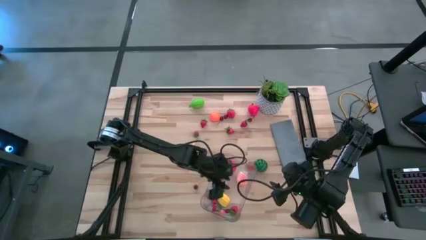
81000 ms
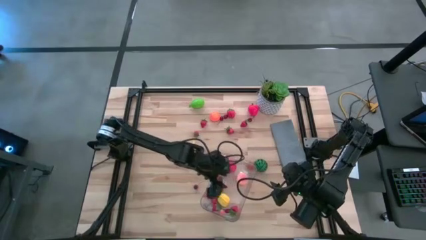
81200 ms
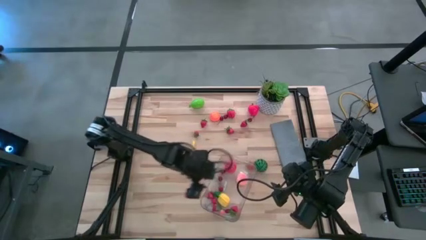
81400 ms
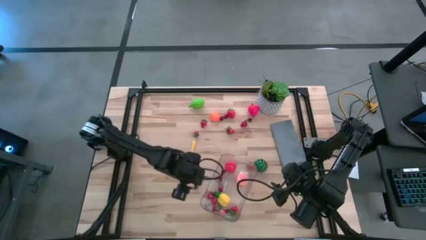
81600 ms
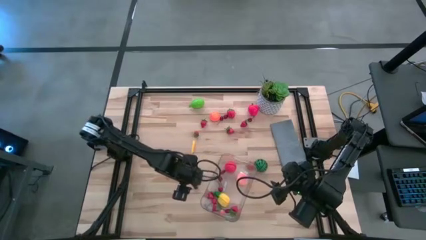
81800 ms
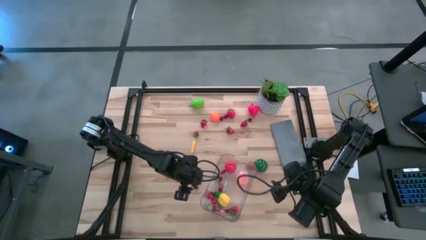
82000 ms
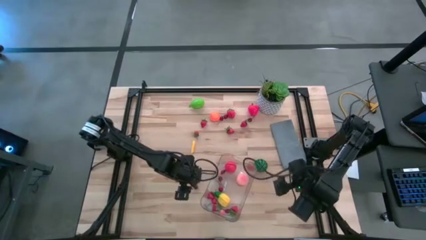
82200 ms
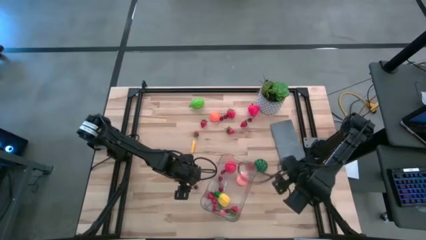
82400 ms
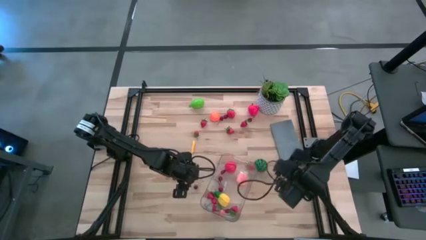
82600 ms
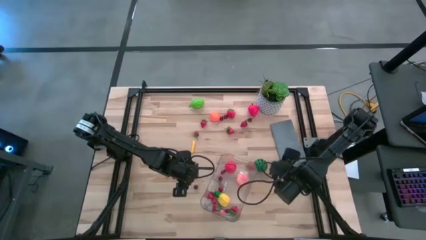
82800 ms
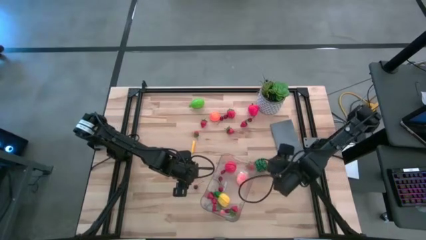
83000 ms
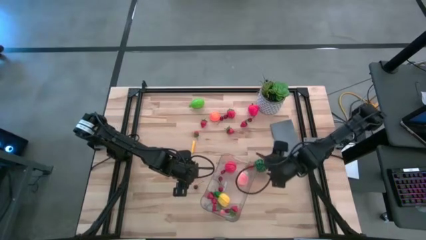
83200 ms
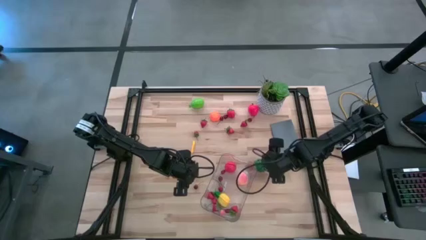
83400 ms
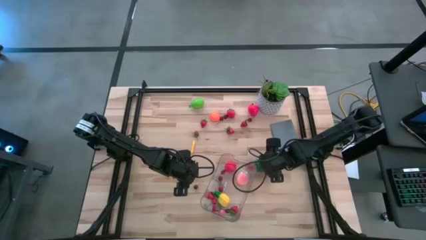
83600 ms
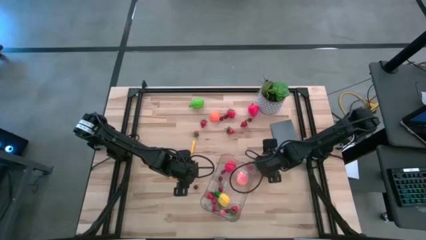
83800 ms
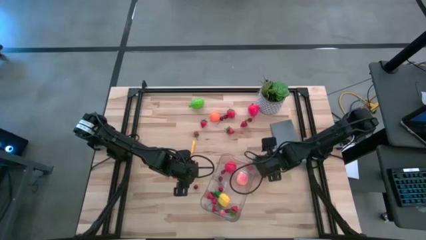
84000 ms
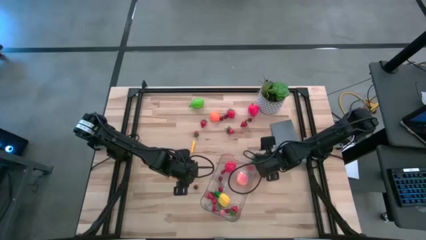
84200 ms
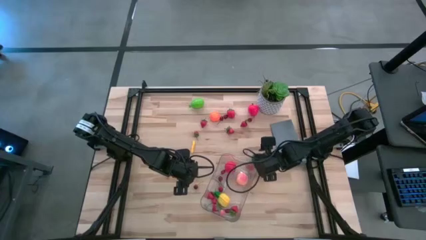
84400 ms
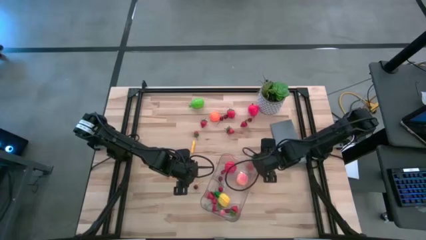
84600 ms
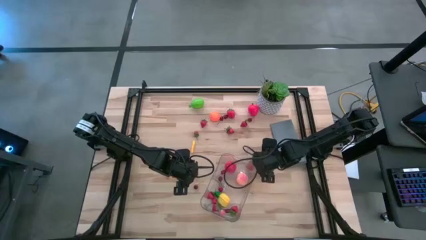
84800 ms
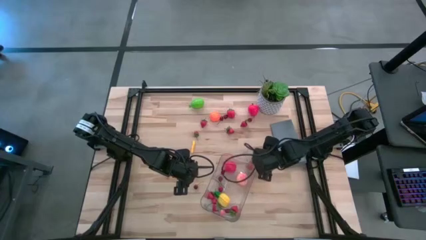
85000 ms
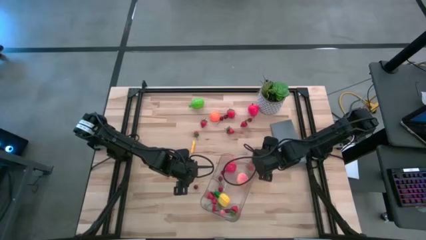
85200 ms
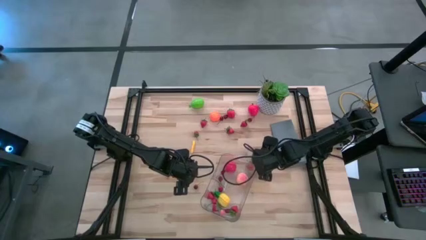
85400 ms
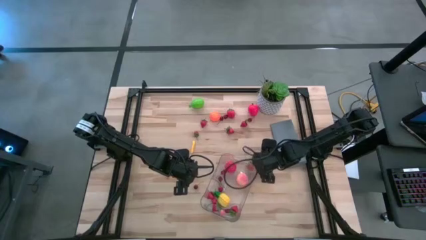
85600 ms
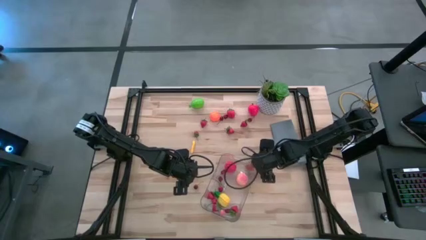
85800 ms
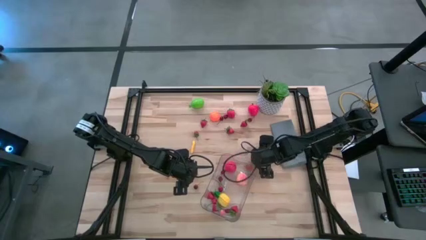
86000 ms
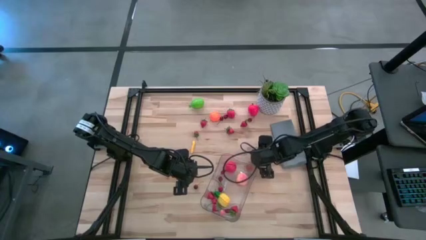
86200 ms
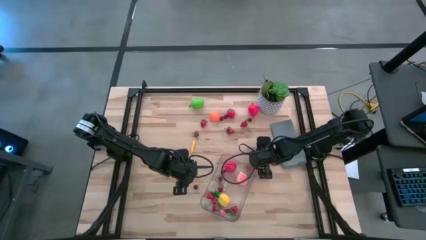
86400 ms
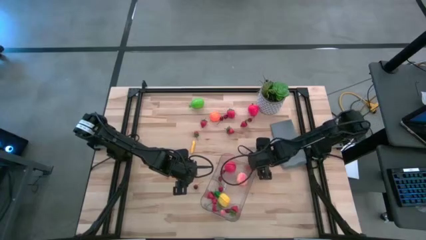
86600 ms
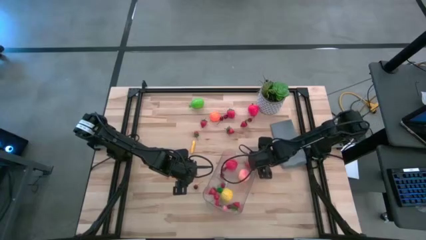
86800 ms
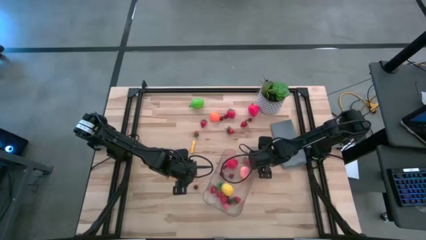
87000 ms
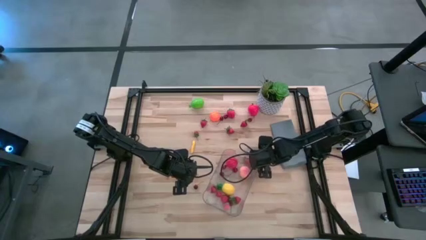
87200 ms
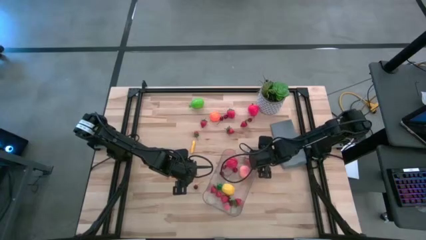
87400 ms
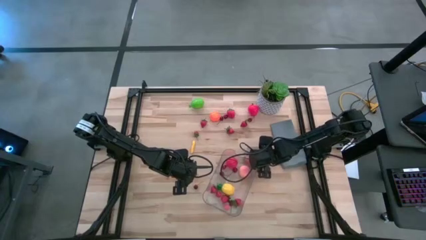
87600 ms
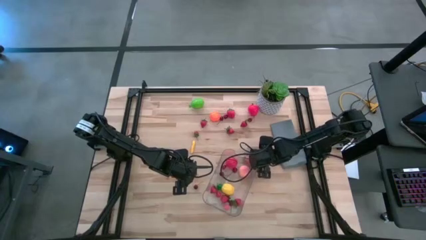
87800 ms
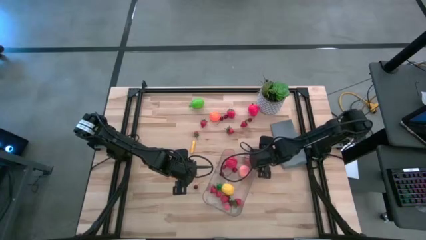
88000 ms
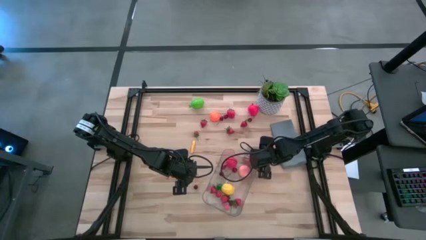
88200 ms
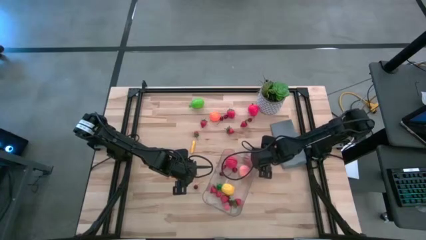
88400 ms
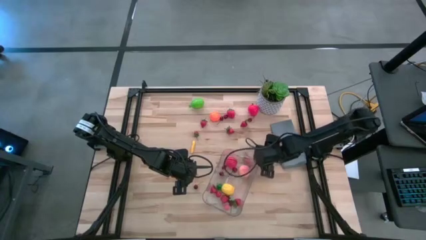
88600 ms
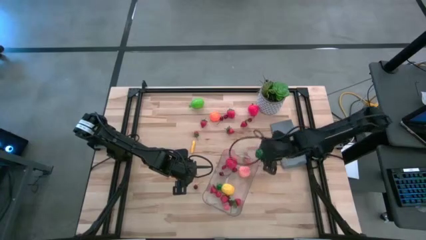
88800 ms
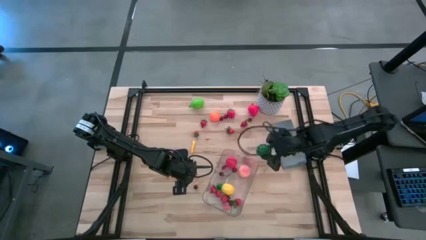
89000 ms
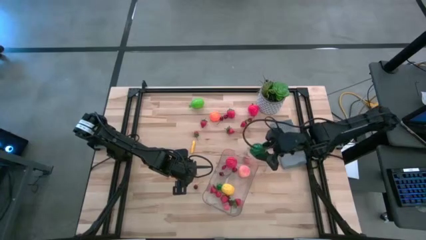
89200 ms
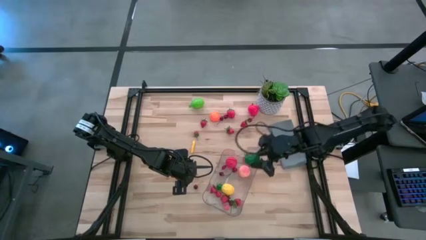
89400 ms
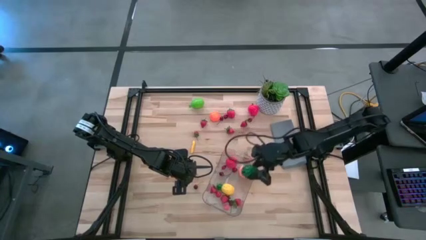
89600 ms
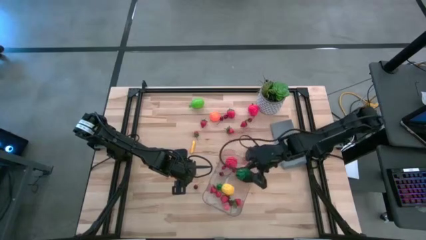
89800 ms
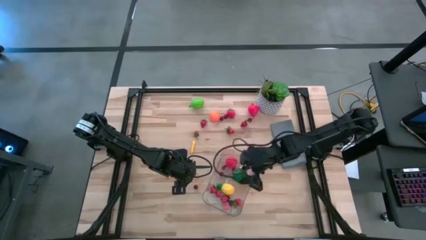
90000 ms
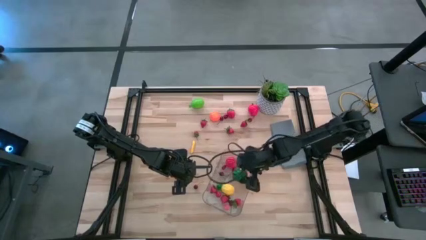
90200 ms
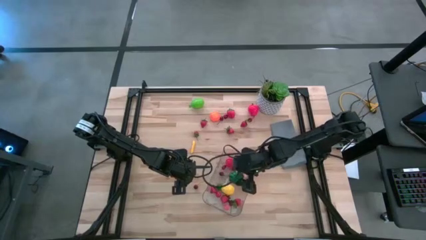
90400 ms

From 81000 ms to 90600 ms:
Task: Pick and placing Produce into tupperware
Put the green watermelon into the transparent basket

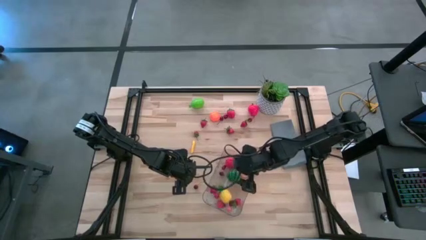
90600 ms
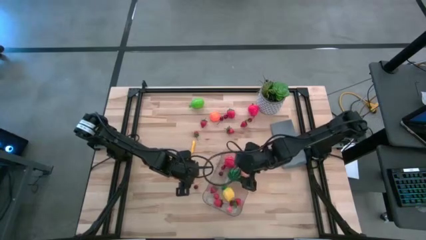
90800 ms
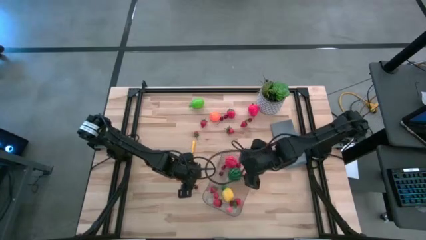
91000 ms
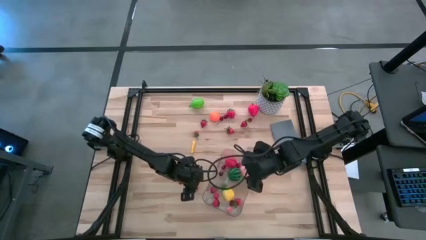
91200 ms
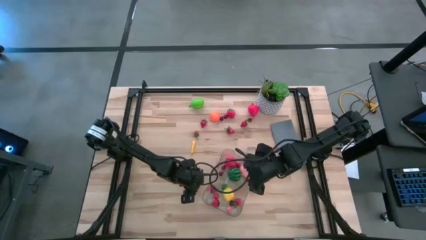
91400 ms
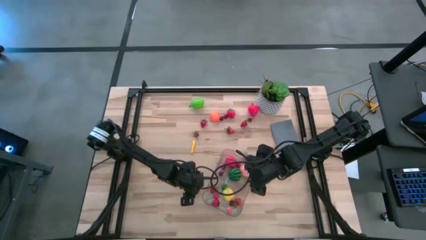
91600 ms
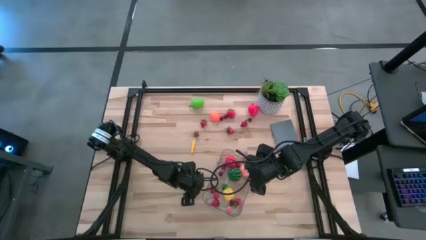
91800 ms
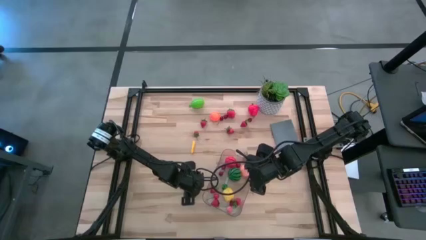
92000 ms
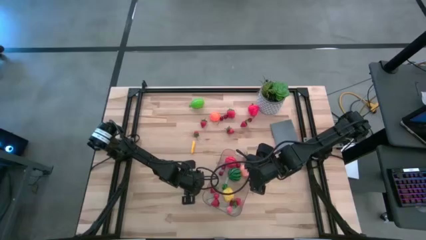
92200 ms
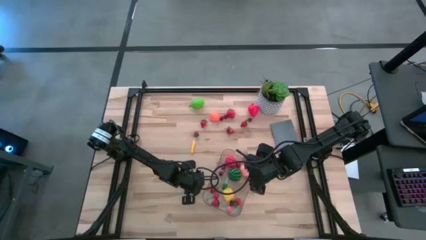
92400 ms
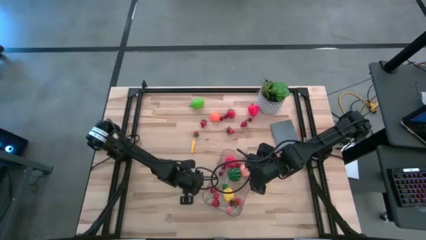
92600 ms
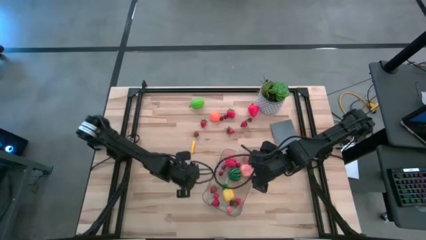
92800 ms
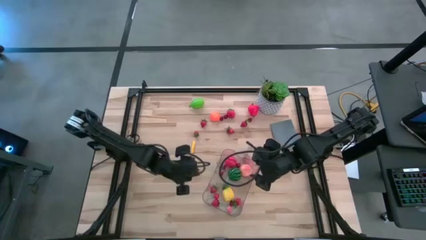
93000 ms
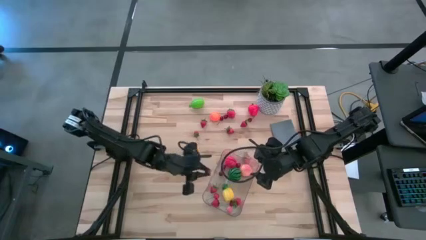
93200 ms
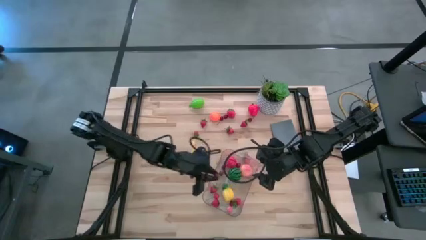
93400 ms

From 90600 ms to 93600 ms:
Put the red cherry into the transparent basket

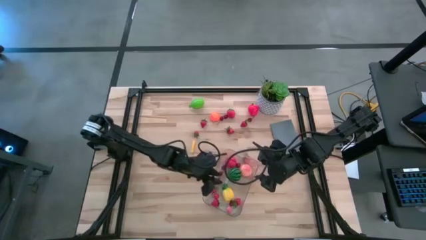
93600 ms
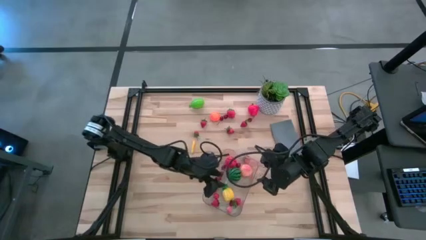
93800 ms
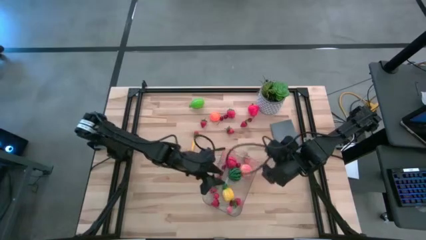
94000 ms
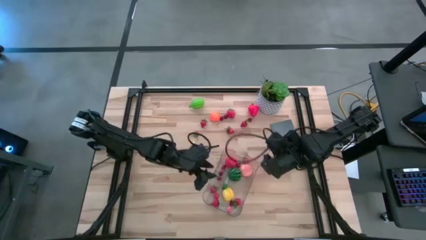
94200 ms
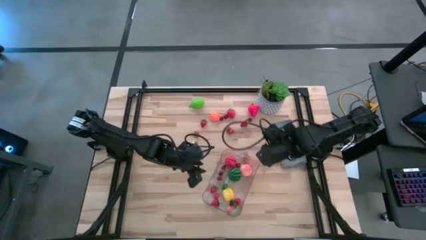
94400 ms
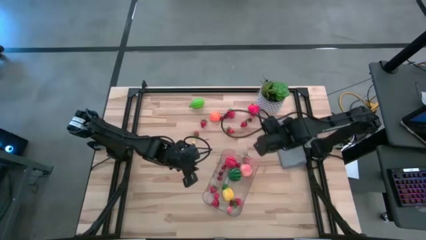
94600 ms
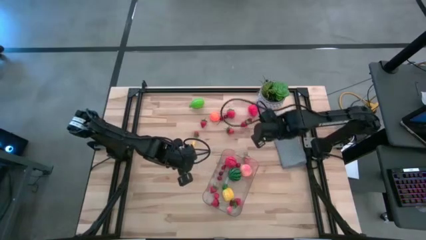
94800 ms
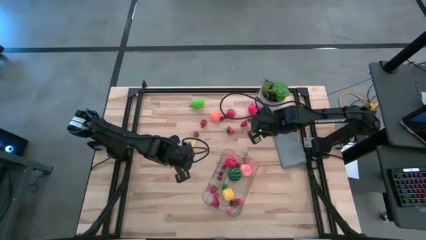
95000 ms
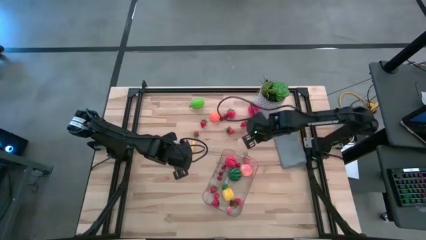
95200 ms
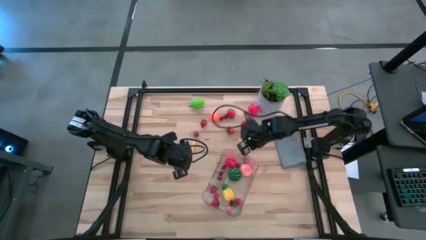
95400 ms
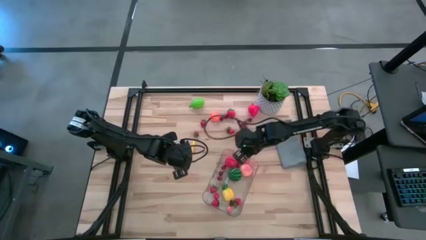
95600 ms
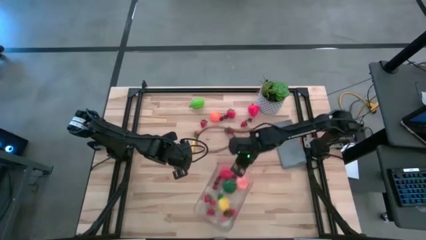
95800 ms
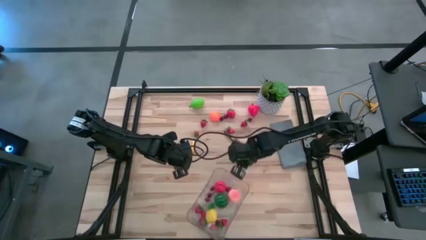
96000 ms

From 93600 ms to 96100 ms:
Move the transparent basket to the bottom of the table

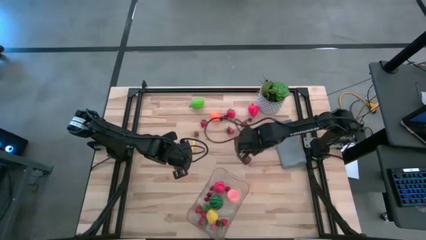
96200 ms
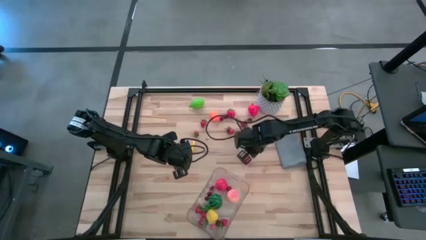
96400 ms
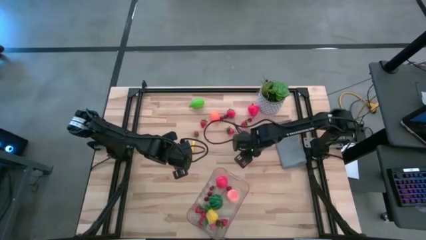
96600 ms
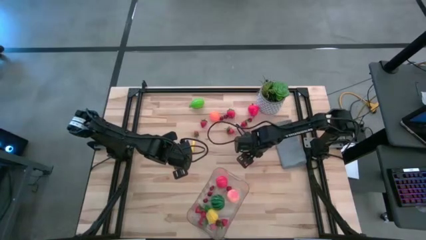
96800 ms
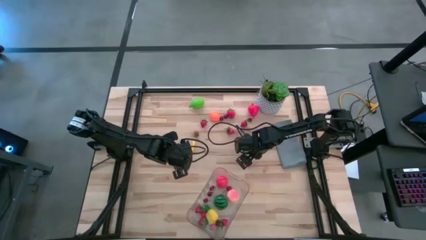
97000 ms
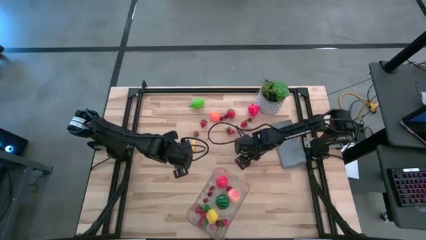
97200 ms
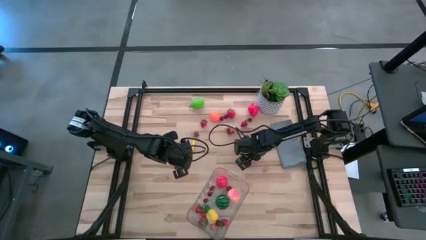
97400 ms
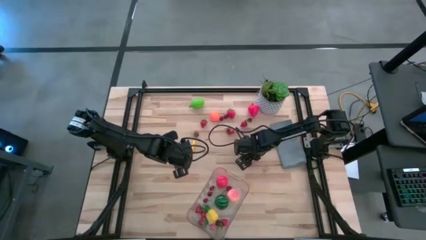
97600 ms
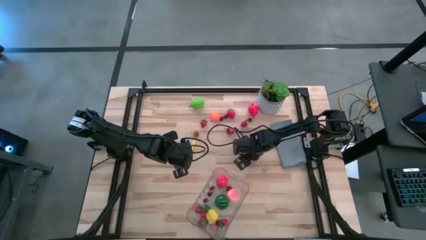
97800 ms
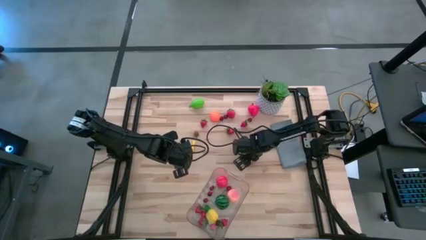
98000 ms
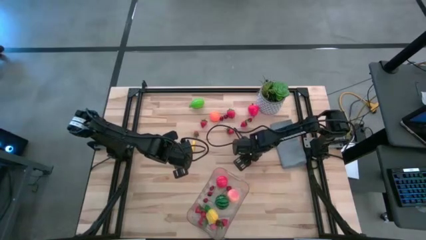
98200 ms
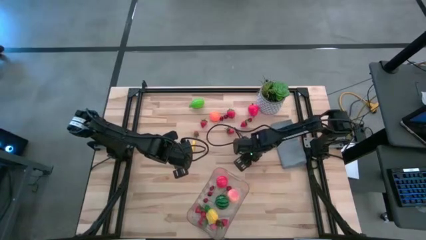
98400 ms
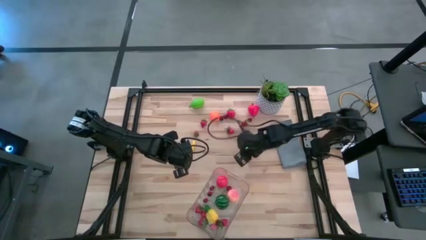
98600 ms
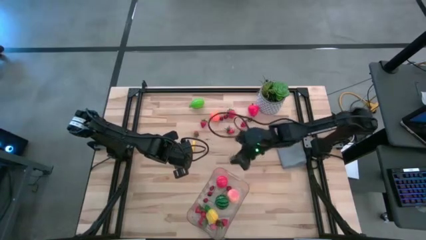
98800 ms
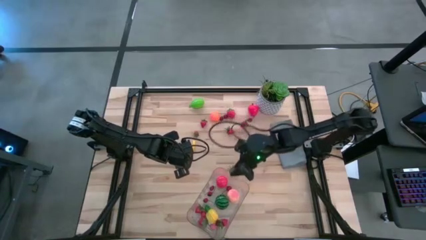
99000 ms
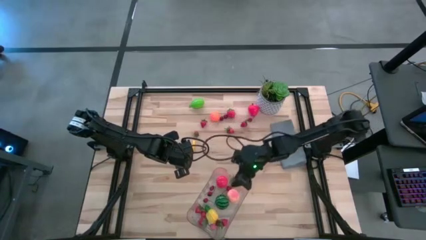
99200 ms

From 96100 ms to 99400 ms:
Put the red strawberry into the transparent basket
